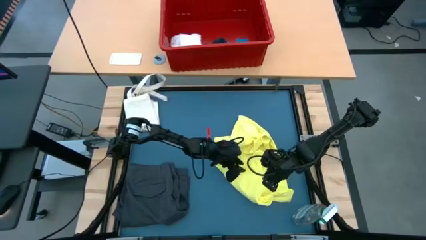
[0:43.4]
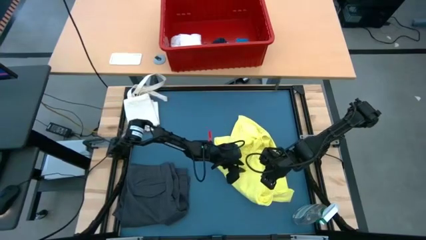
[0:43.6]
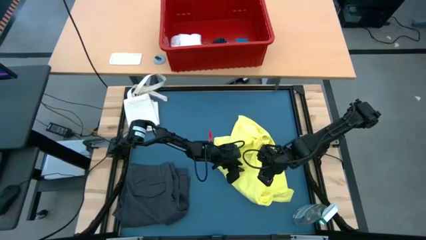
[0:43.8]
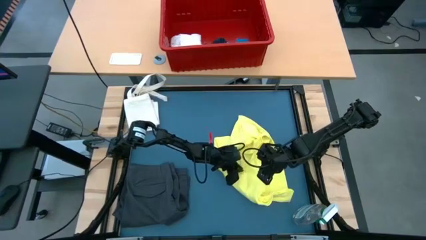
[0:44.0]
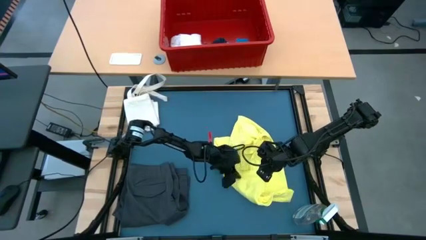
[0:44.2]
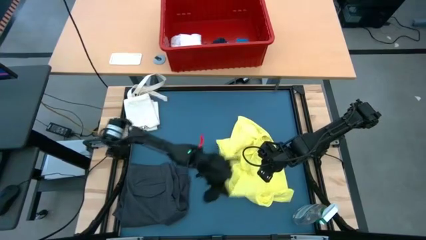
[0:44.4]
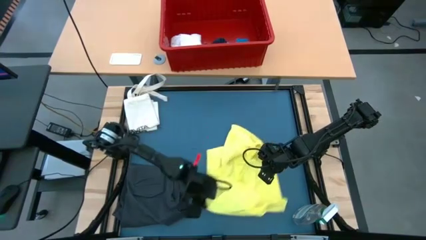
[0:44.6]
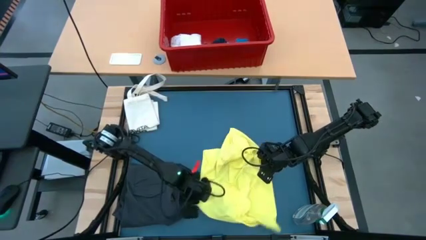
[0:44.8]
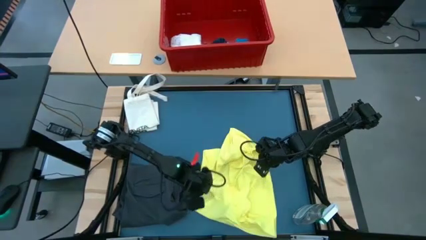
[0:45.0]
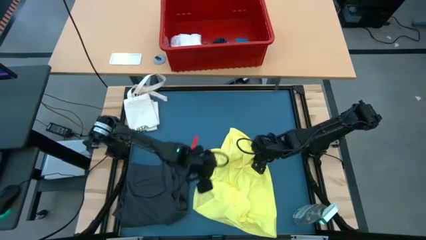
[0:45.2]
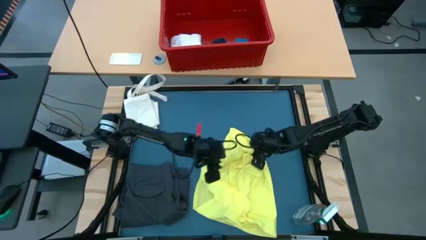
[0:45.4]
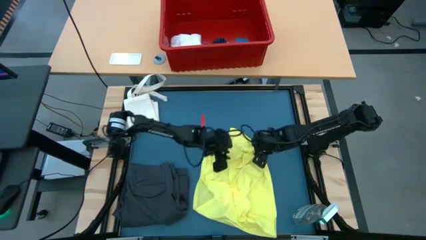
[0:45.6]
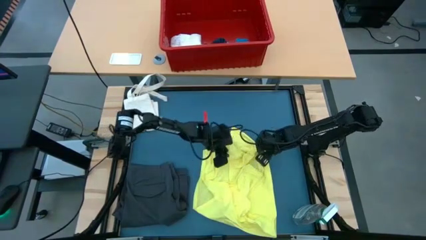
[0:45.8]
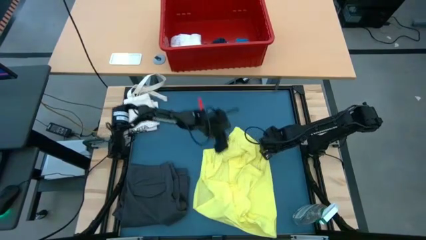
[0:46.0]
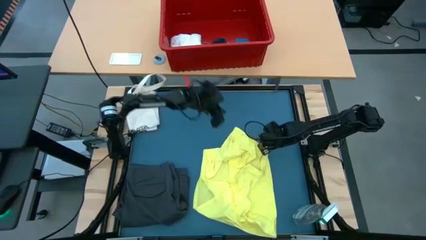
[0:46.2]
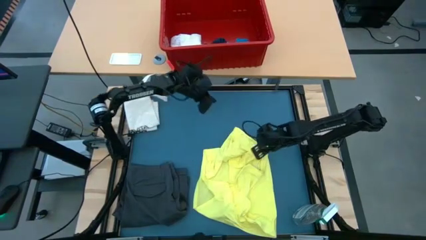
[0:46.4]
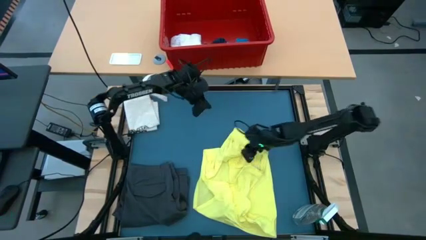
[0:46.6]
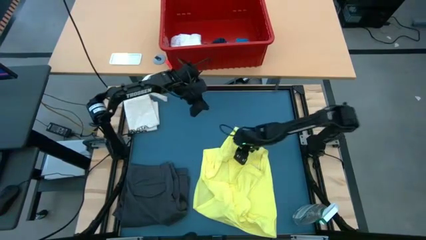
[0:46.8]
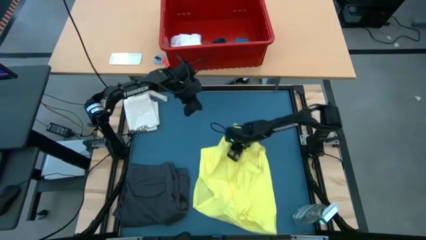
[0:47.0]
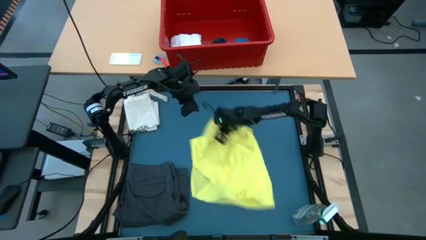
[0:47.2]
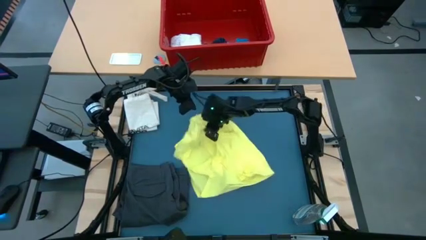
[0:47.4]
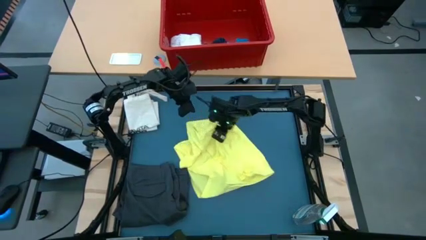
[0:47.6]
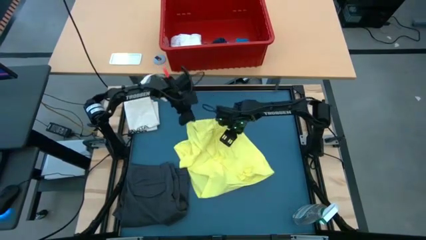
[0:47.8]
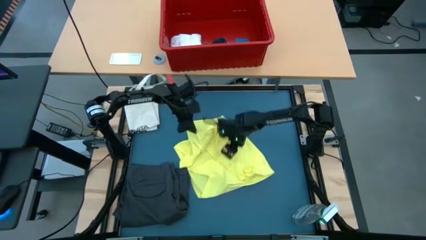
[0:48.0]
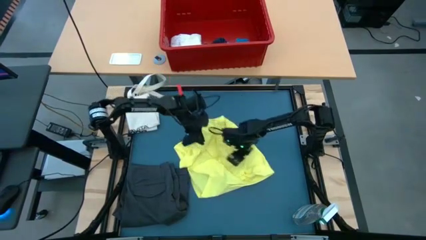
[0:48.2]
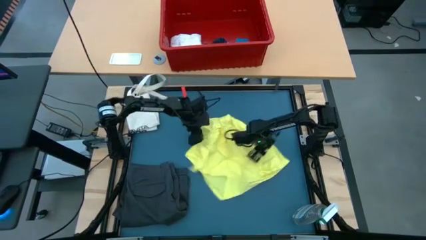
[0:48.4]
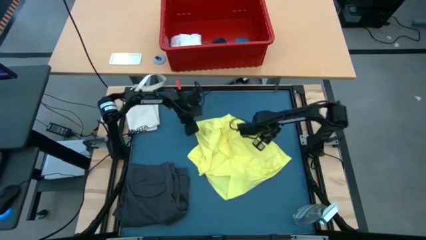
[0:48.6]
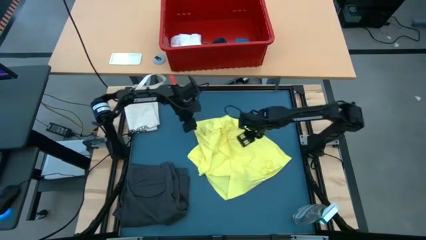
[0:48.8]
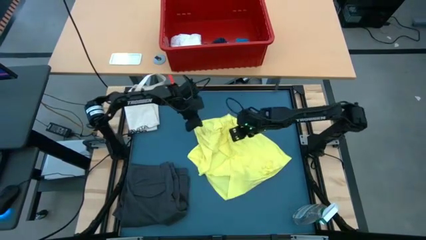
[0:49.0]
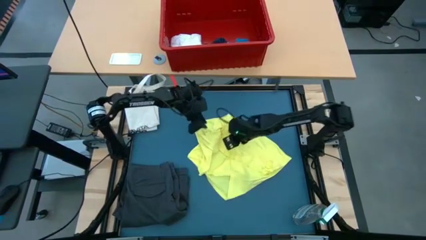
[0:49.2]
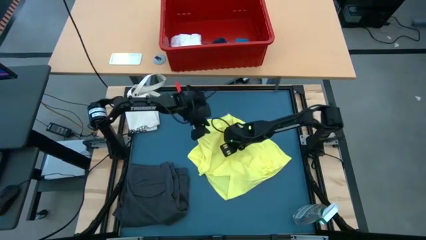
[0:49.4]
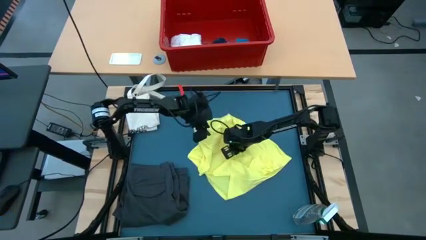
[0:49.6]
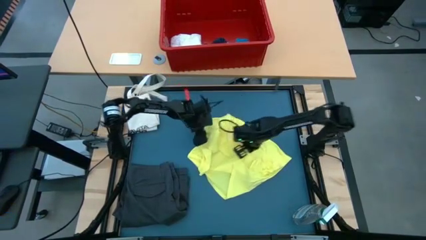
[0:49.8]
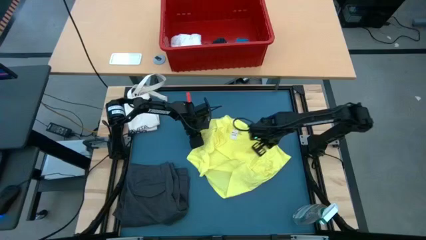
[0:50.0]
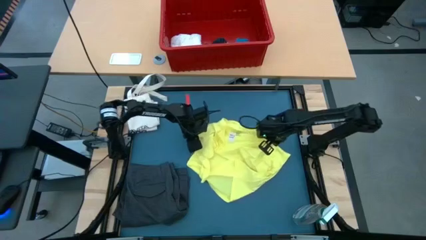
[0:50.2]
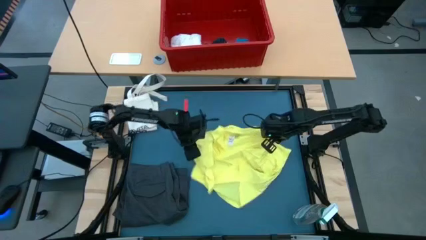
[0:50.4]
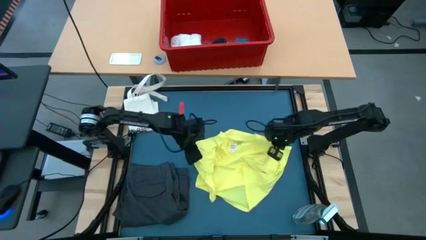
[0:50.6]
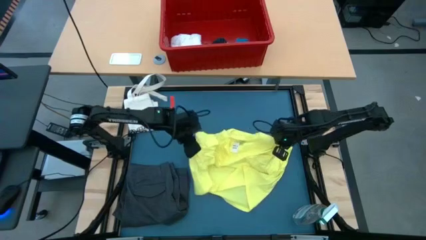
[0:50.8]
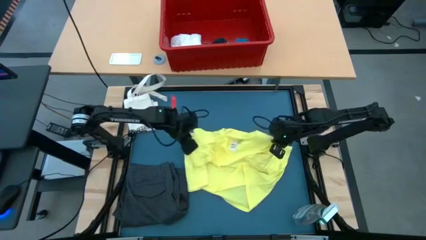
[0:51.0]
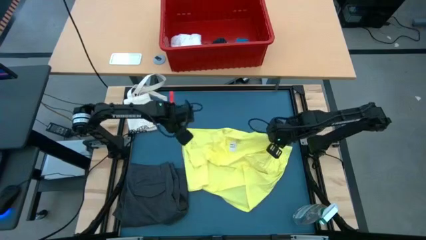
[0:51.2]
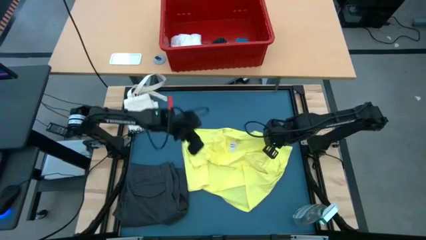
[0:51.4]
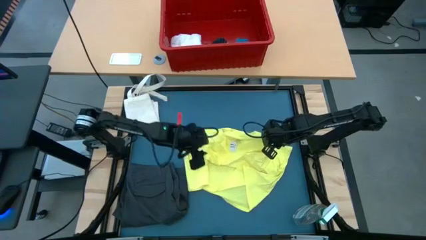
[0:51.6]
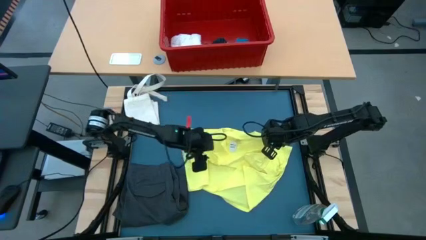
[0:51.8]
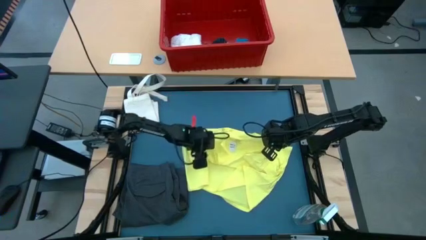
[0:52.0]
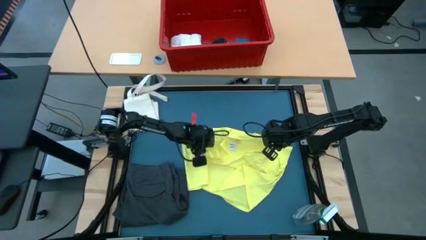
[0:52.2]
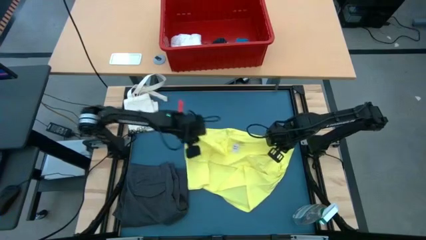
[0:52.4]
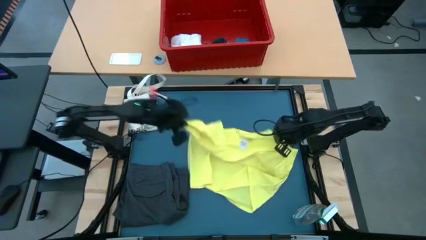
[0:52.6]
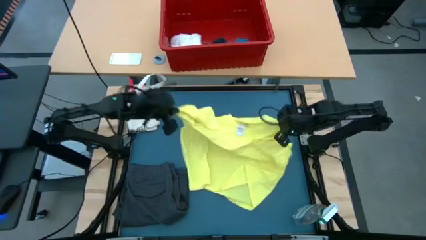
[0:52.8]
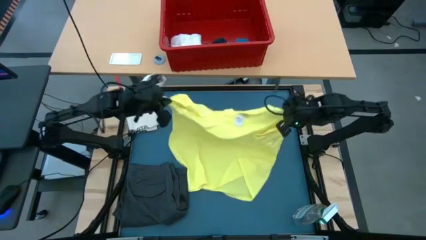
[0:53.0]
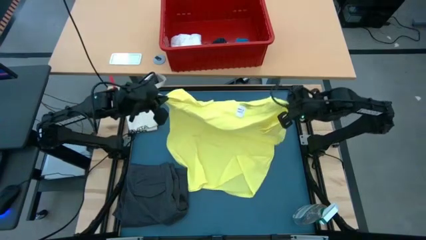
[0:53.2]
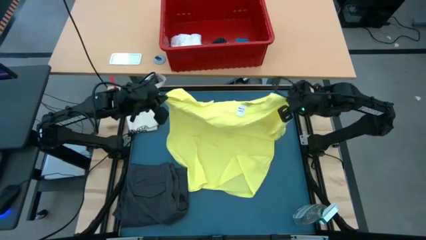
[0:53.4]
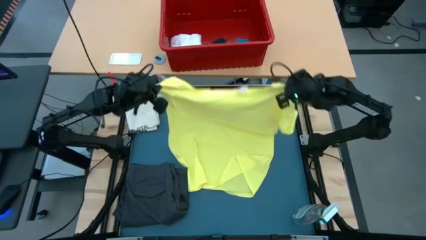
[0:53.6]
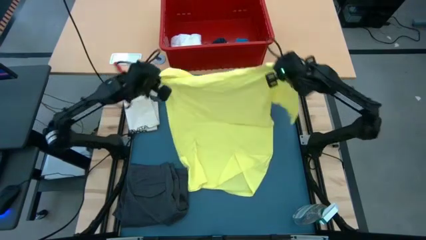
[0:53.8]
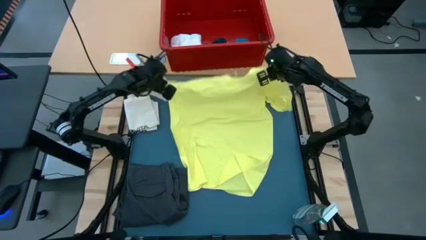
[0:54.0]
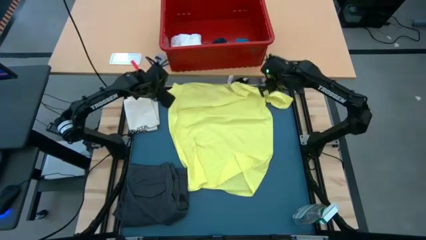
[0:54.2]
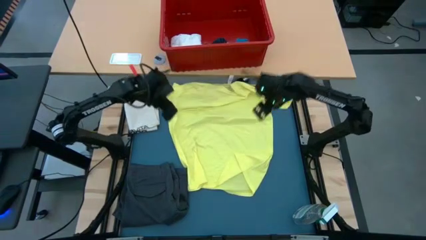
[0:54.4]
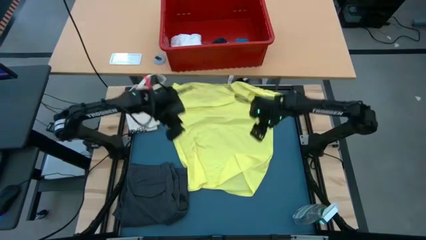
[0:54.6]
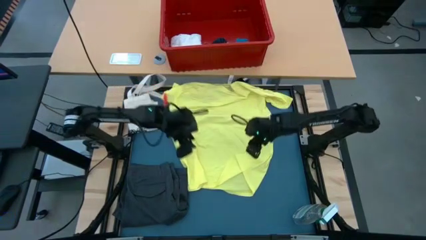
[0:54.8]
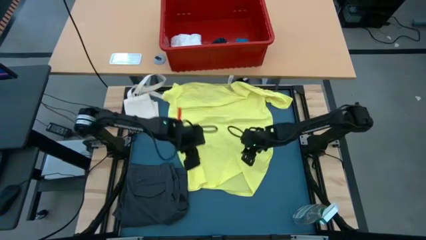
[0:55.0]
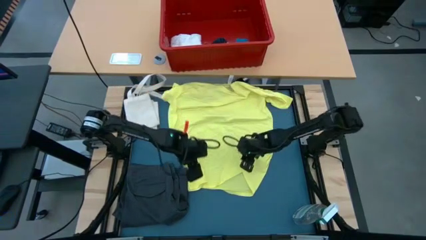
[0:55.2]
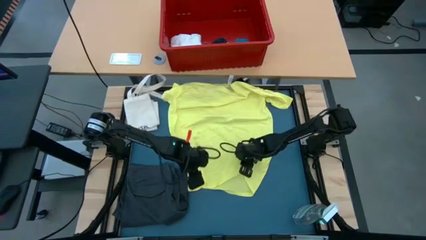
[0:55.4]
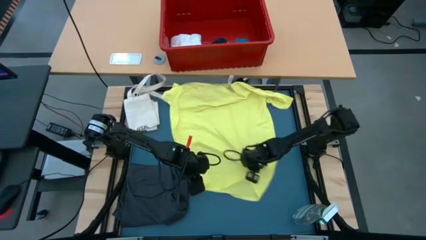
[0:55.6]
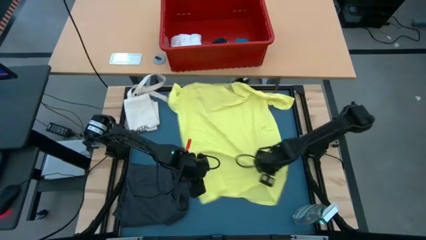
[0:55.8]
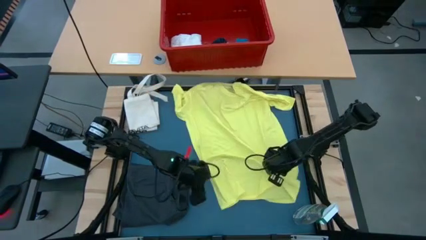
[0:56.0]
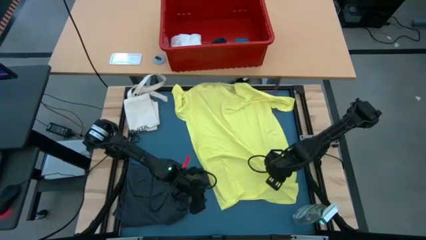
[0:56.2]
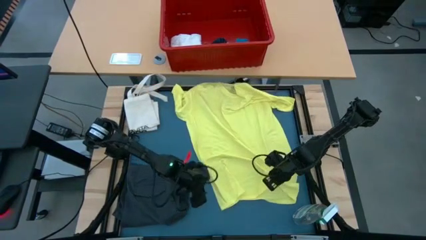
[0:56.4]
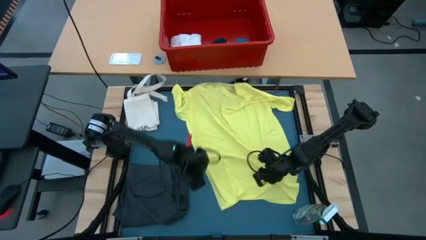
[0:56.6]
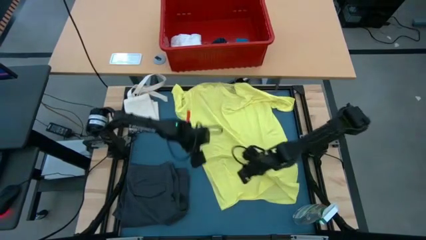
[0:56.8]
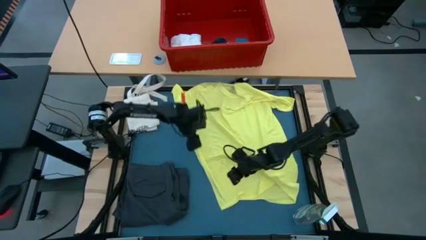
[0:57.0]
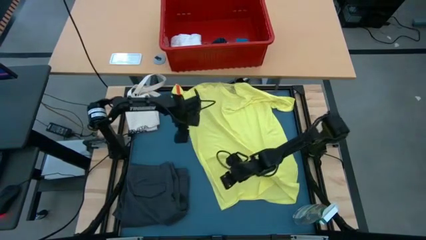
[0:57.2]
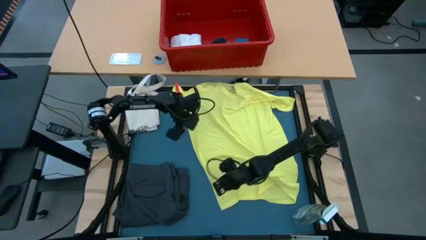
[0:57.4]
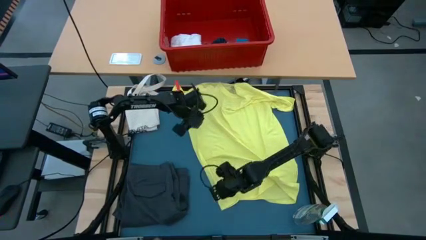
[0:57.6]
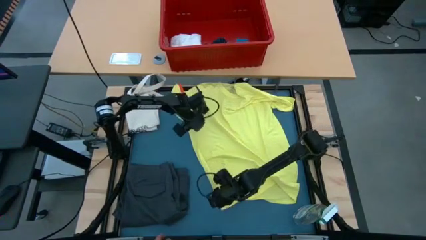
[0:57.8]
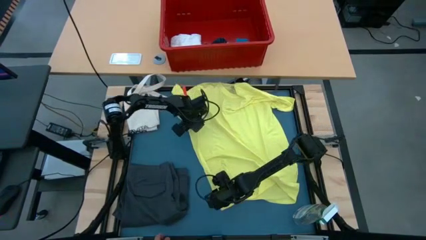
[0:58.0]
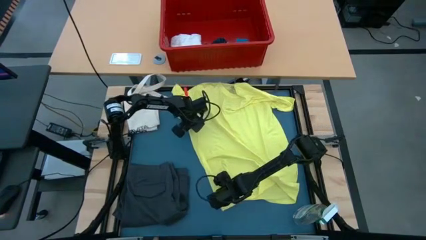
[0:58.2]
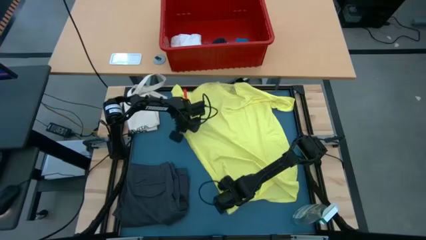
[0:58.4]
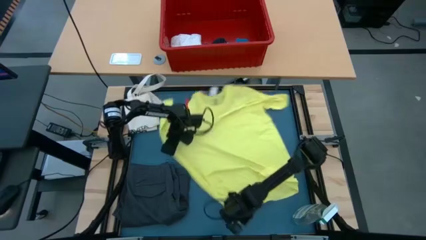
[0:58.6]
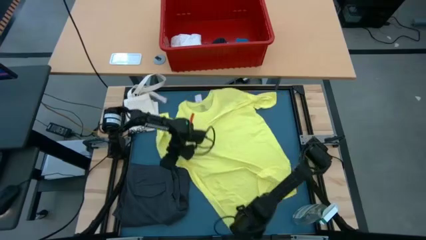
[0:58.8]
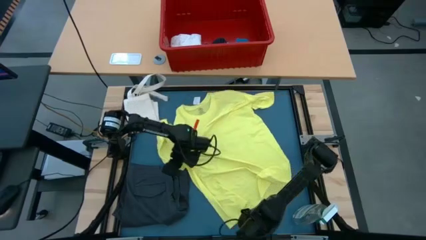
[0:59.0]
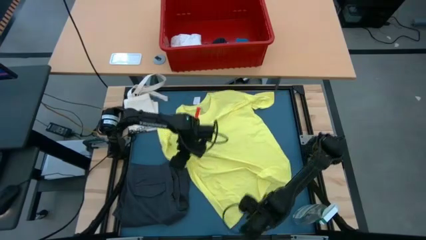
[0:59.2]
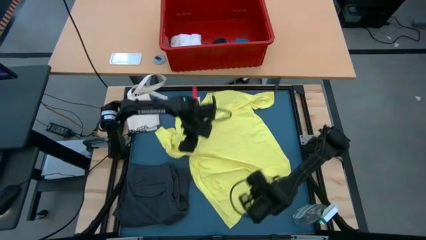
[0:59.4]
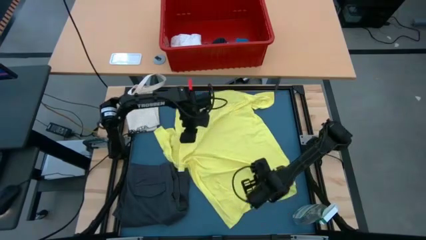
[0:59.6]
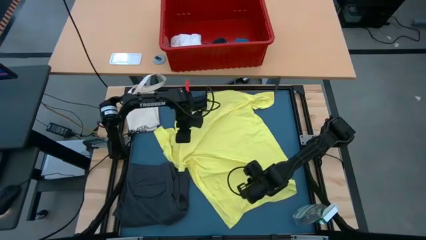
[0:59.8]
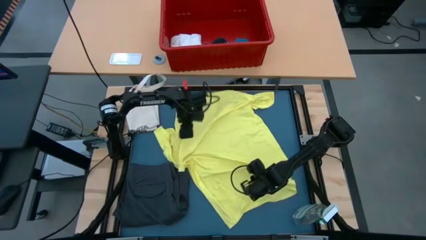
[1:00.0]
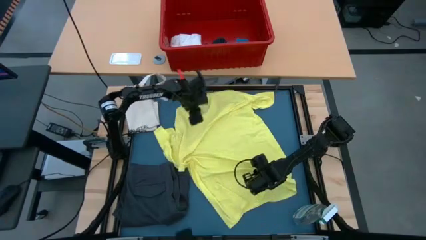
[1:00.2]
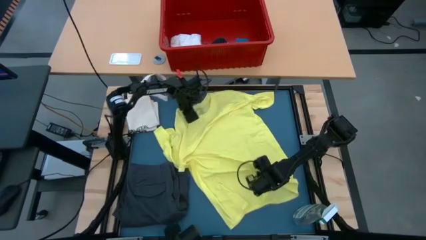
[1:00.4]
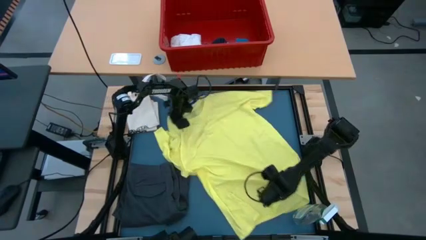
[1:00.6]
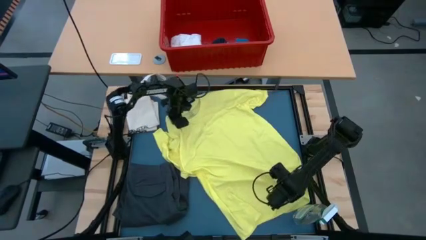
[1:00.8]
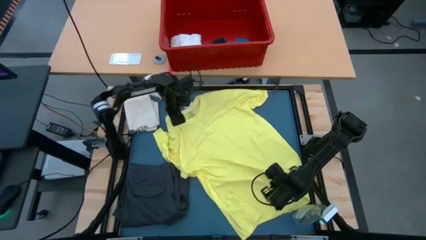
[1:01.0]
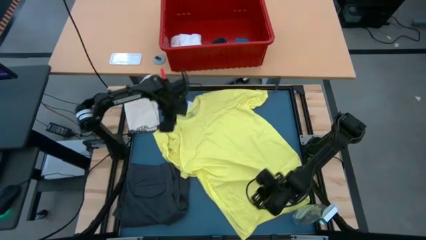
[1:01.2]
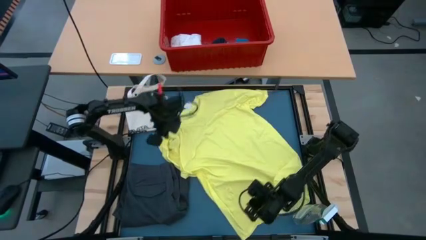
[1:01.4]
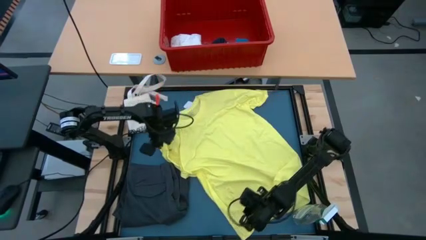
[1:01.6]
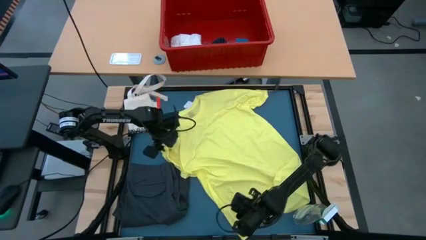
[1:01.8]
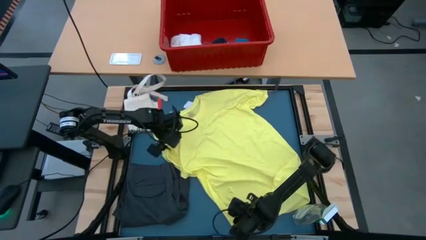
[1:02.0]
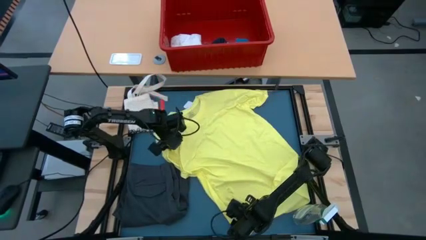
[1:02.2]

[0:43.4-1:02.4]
Task: Fold laundry
Fold the yellow shirt
